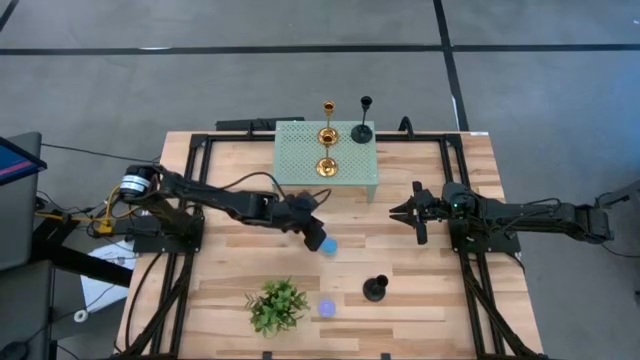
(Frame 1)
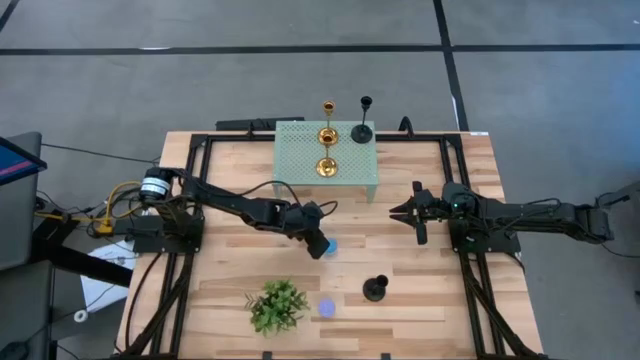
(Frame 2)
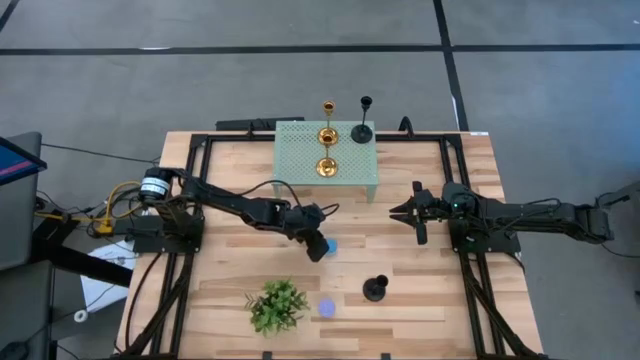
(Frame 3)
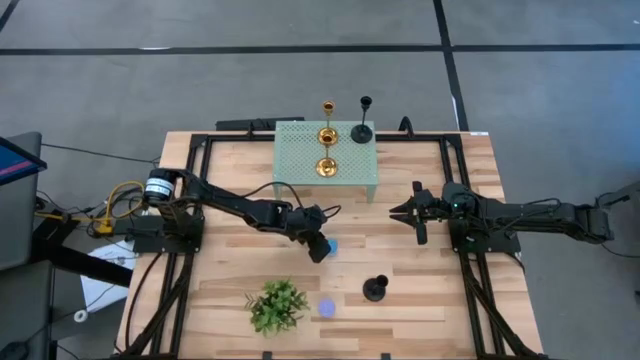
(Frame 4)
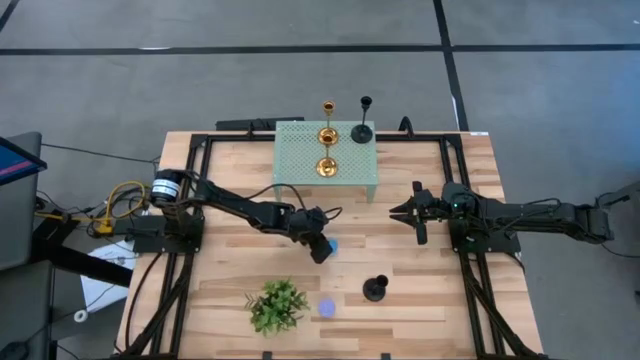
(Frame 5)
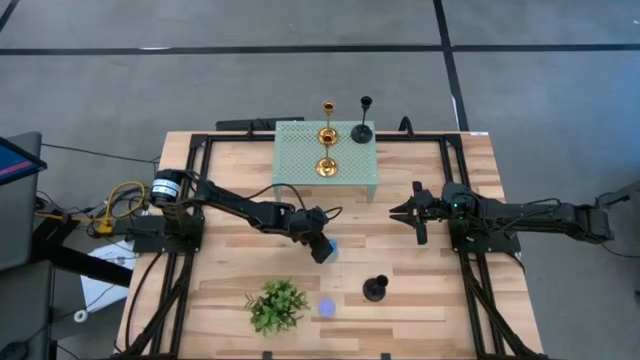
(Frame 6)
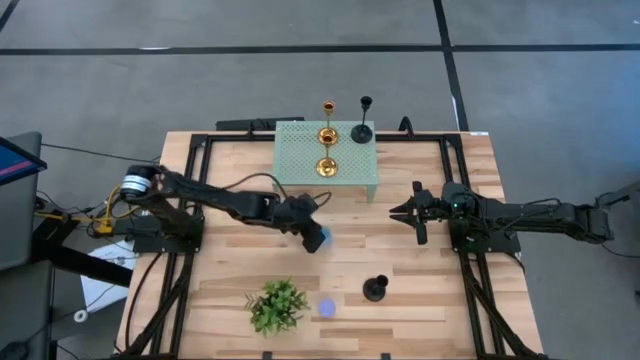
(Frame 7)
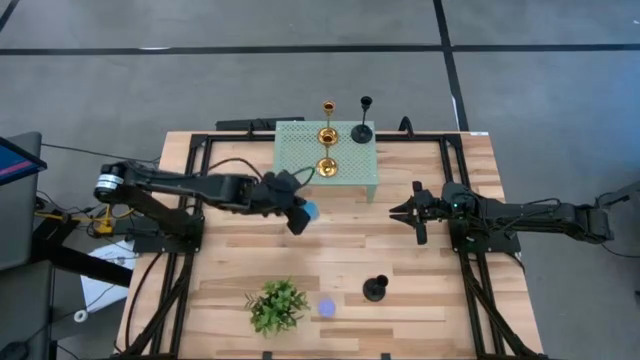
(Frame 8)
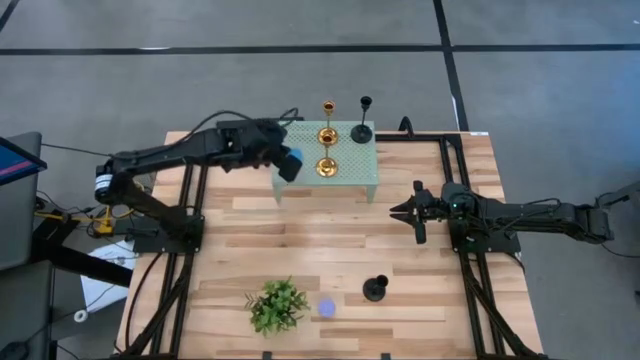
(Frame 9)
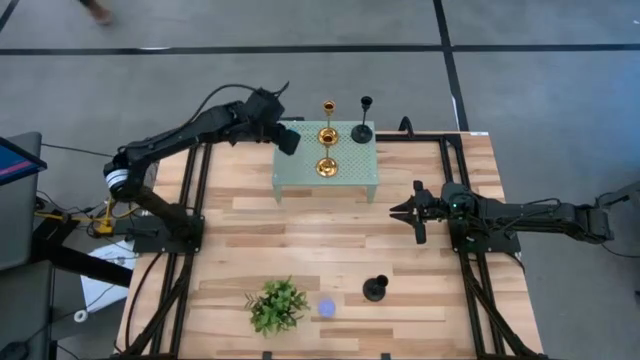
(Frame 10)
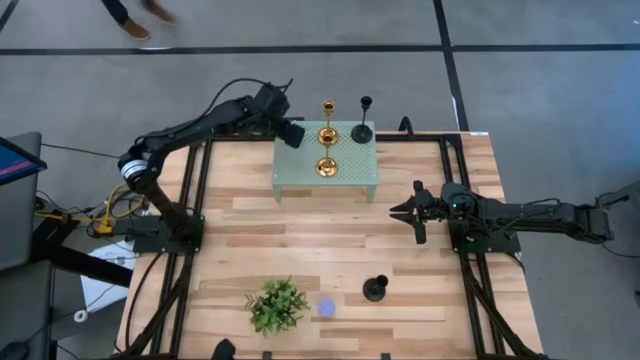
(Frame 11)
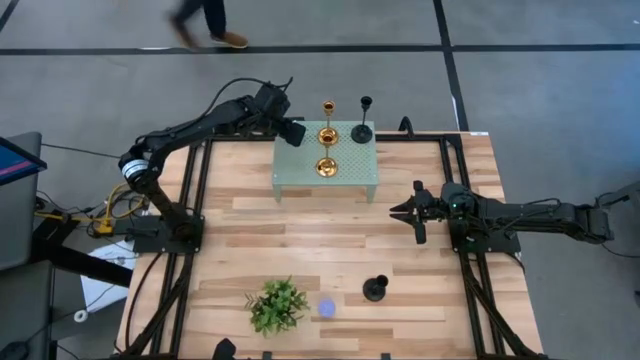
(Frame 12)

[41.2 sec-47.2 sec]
Task: Pick & Place candle stick holders
Put the blue candle on the shelf

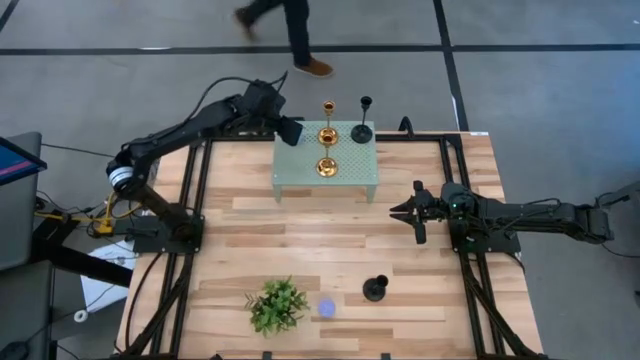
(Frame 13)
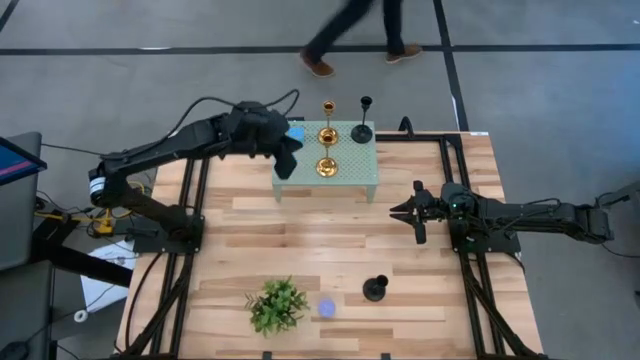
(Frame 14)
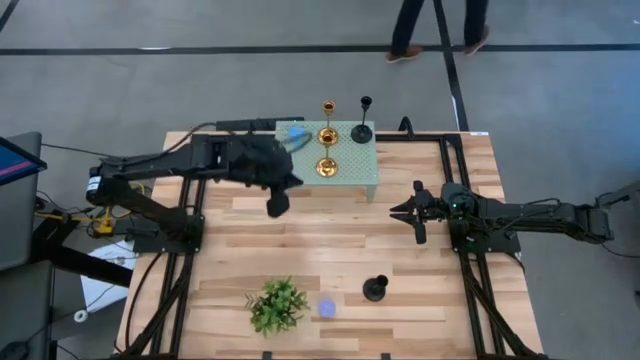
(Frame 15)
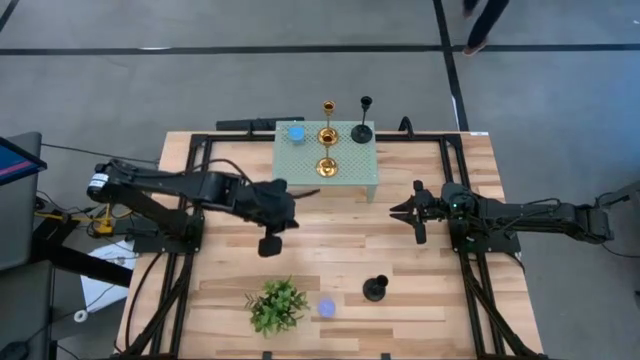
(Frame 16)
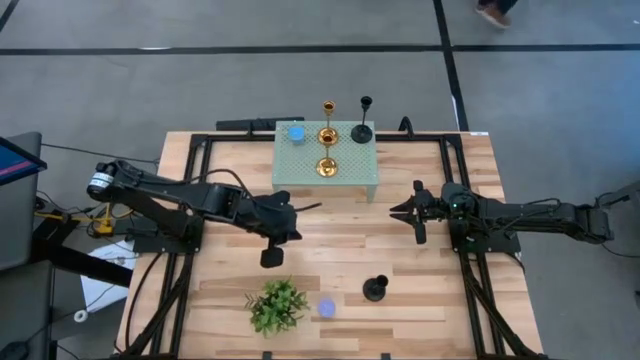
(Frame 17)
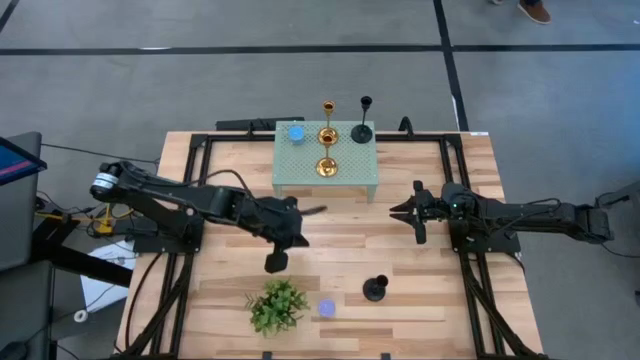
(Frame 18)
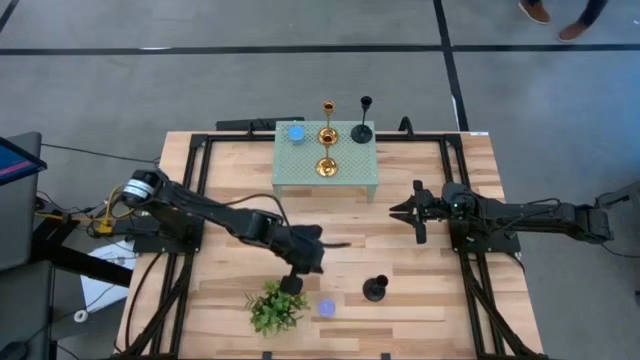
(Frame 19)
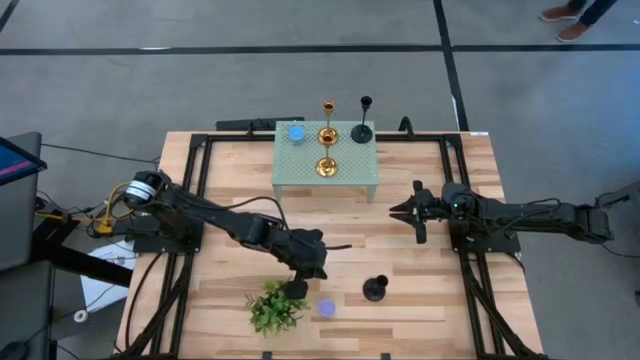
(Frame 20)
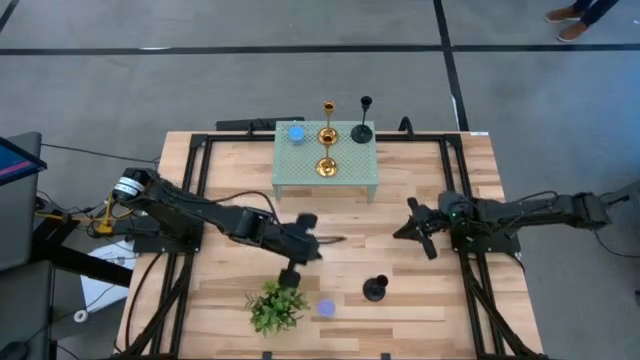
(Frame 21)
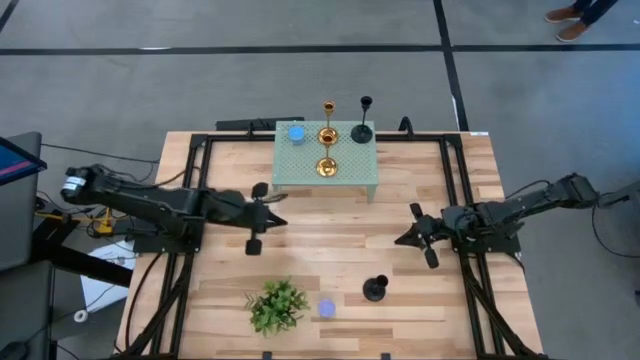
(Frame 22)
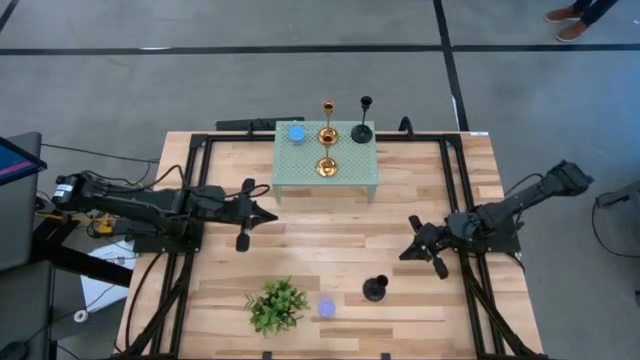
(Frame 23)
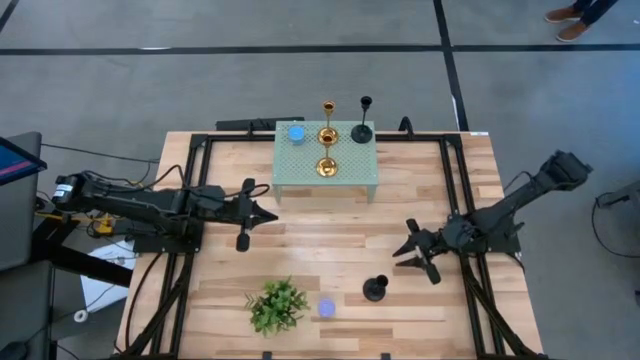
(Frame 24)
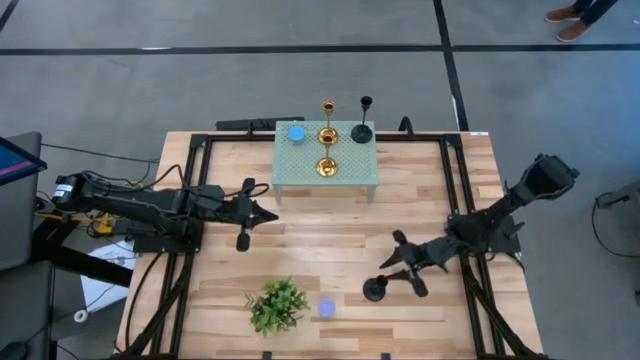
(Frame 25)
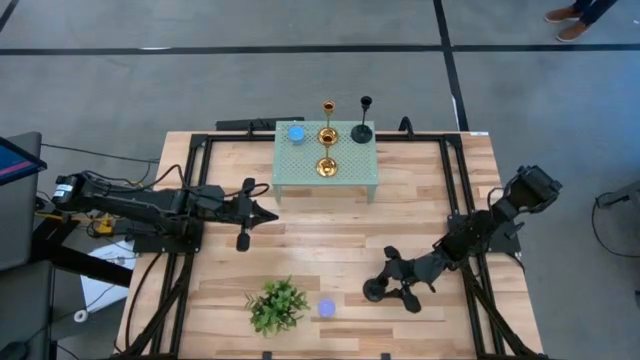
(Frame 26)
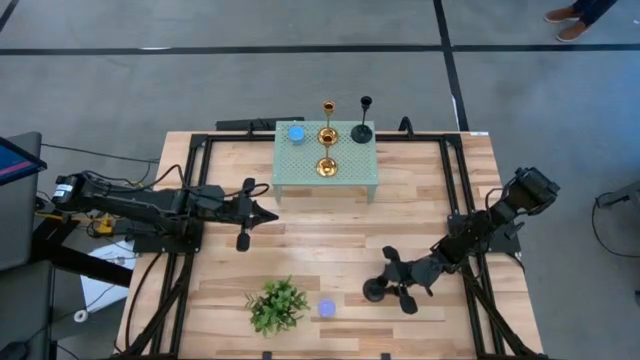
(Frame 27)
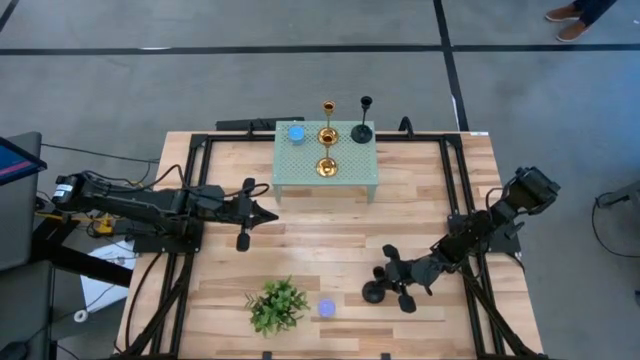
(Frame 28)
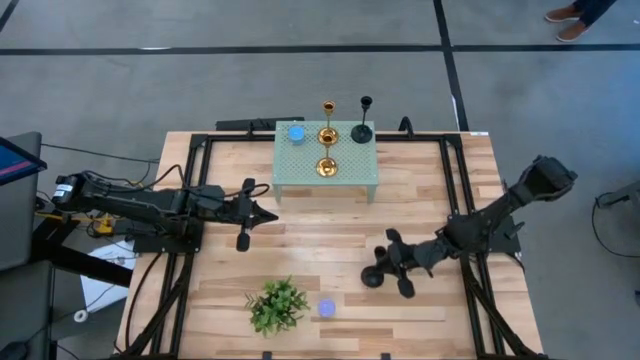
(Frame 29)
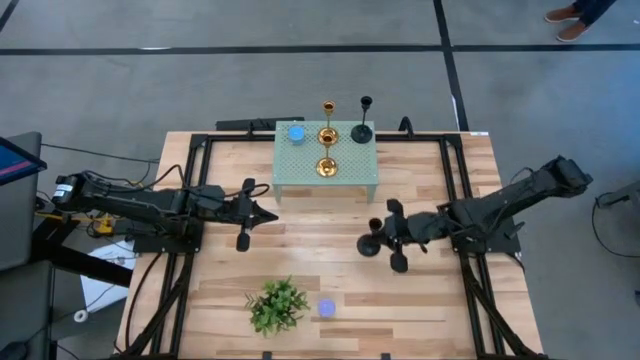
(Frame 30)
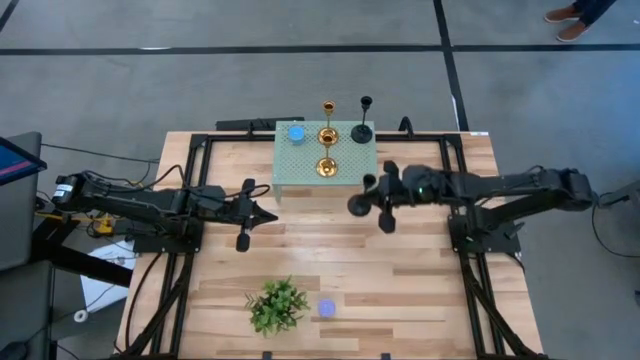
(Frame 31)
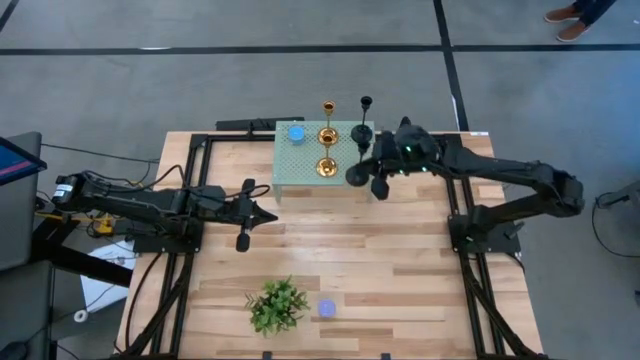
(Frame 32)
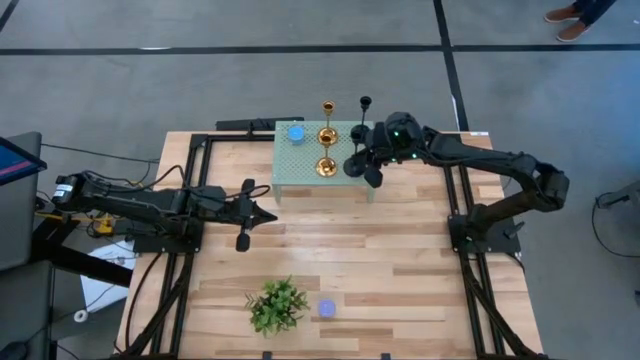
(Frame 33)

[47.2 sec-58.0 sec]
Put the black candlestick on the shelf

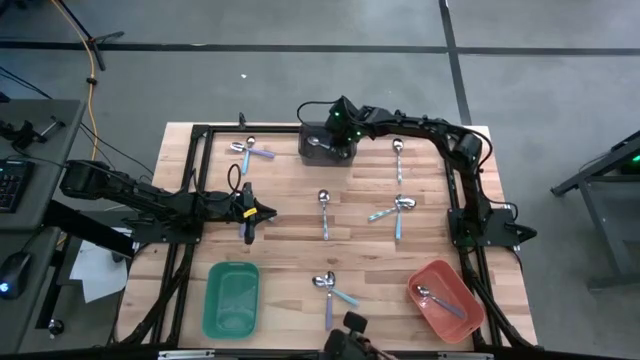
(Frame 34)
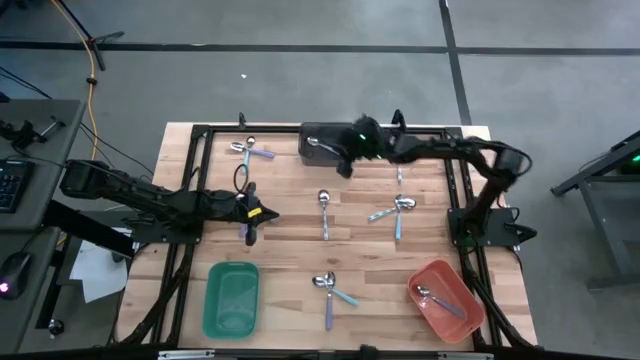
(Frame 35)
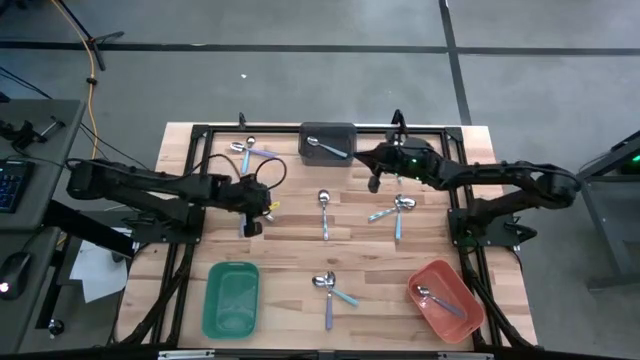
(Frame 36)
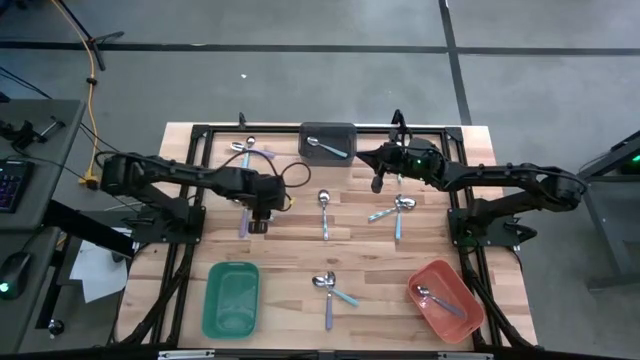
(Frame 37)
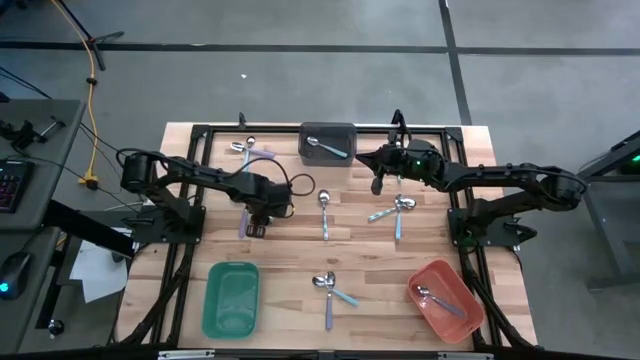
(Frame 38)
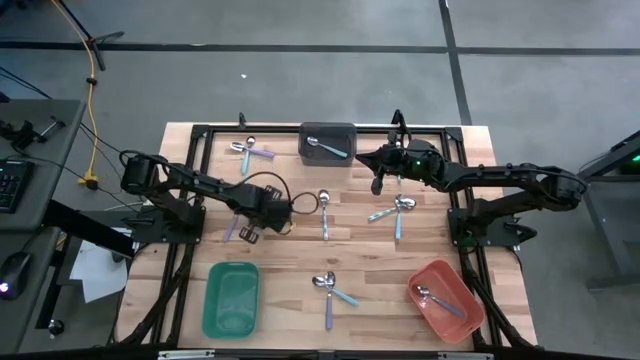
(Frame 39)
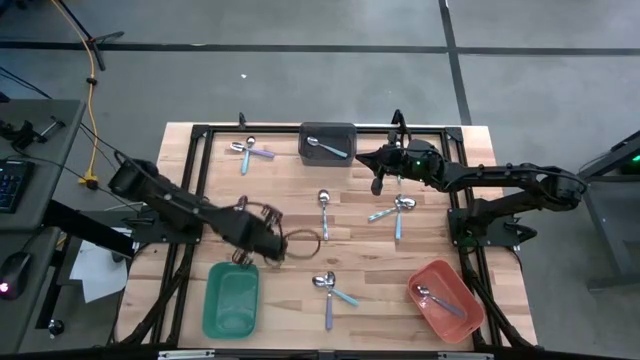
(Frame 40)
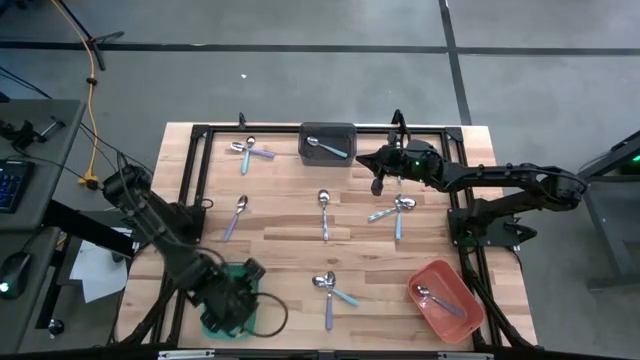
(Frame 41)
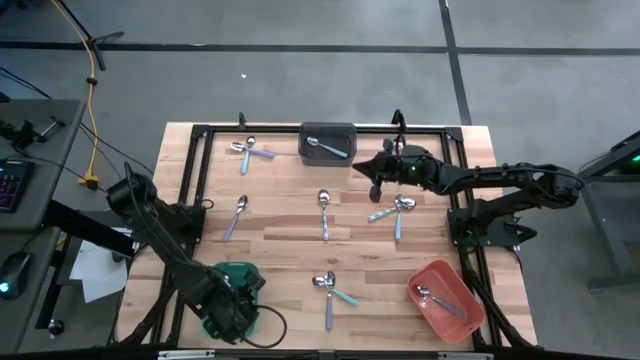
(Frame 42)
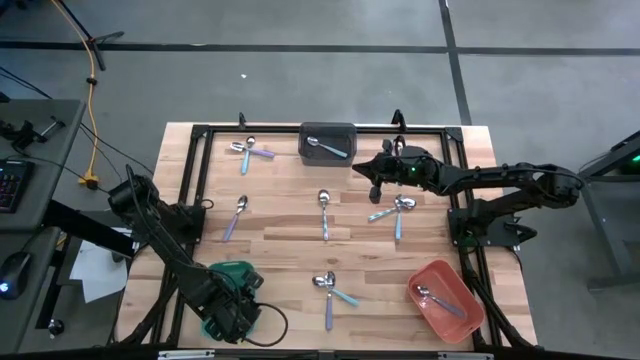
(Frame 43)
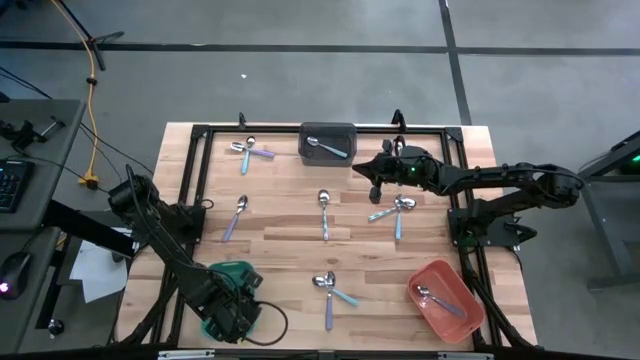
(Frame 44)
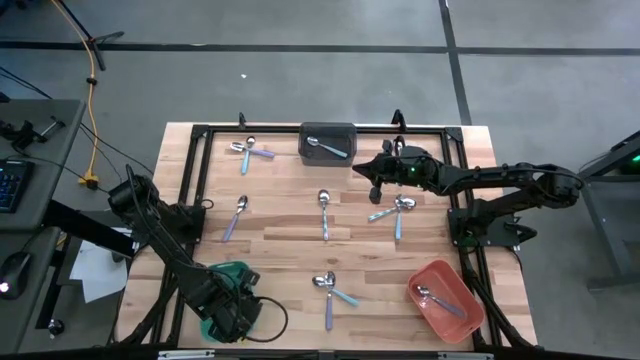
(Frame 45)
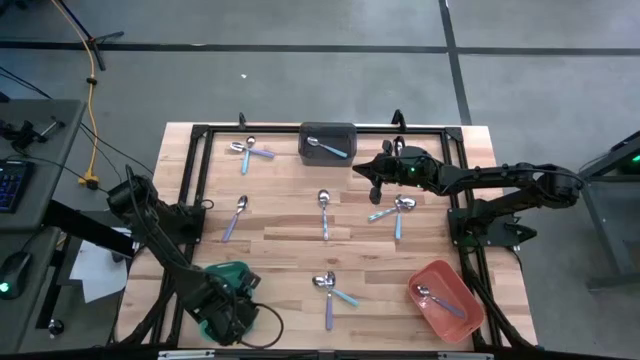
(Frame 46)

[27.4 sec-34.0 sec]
Task: Sort silverware by color (type)
Put the white patterned into the green bin
